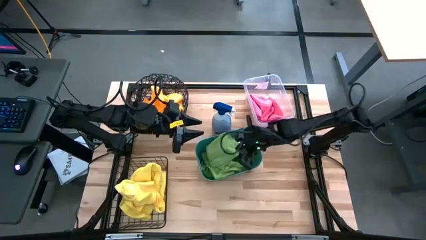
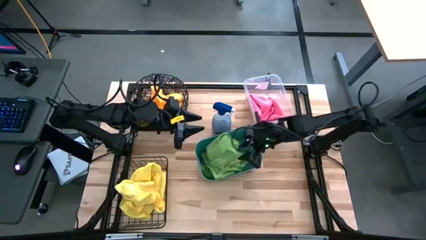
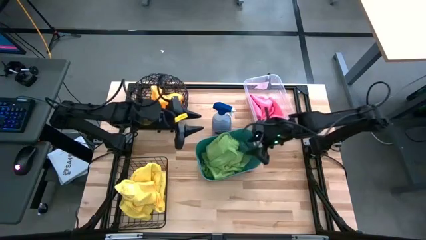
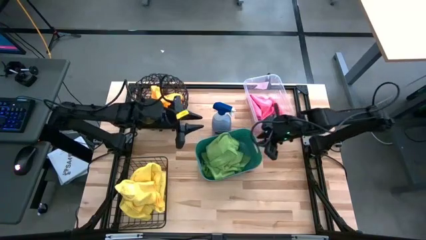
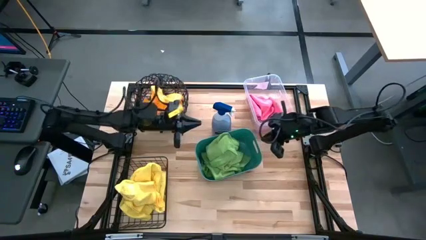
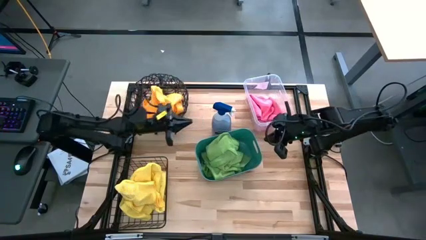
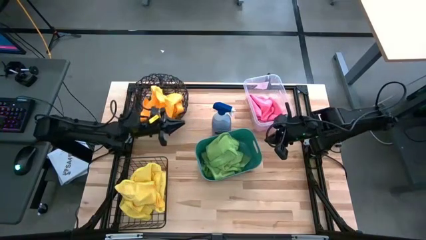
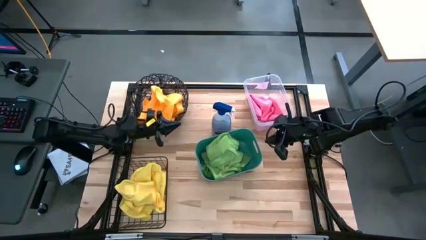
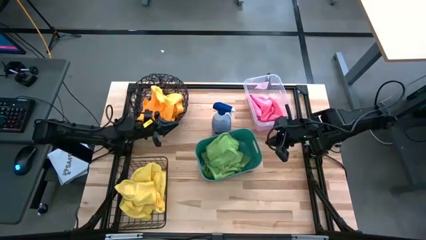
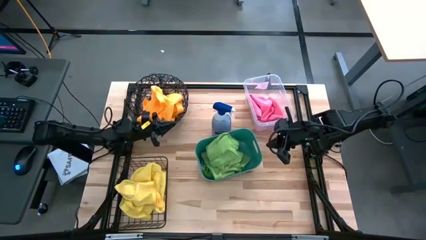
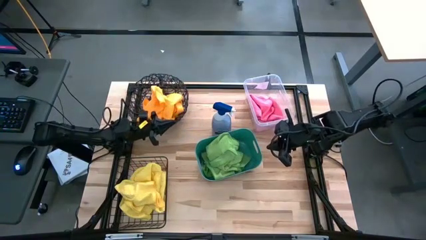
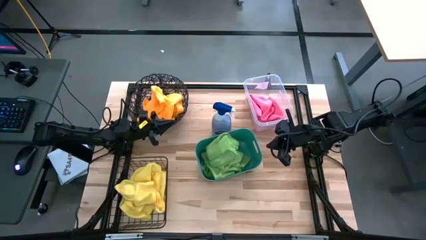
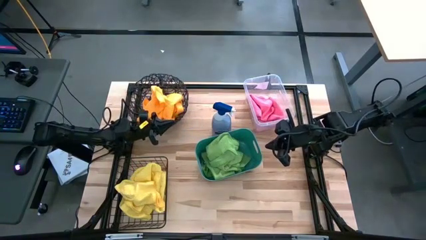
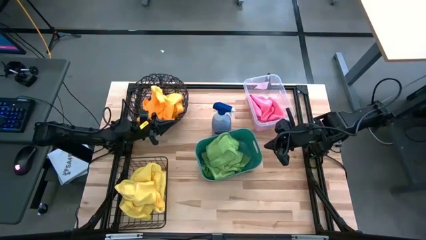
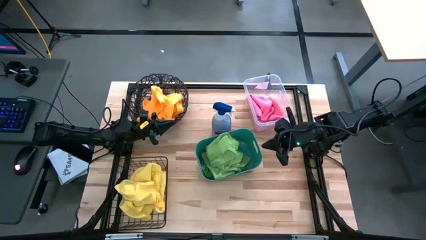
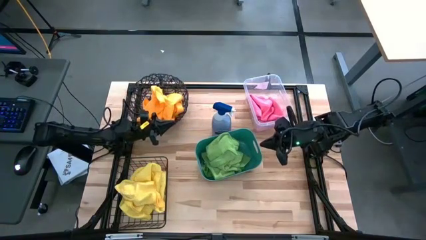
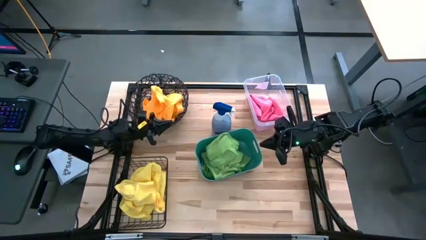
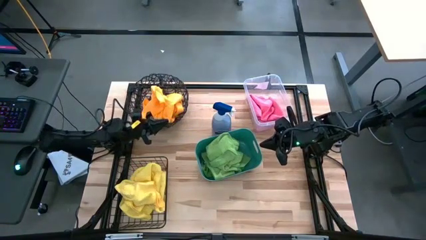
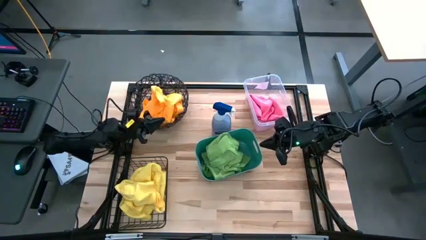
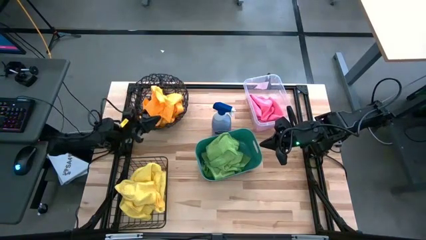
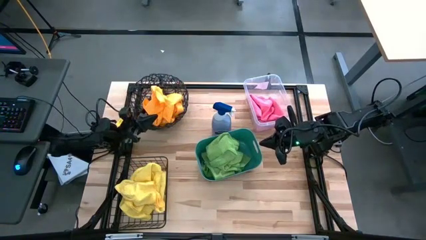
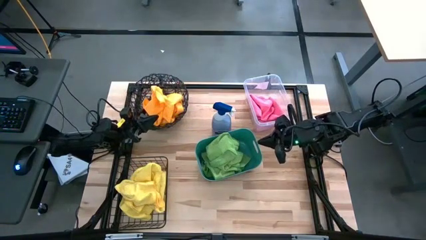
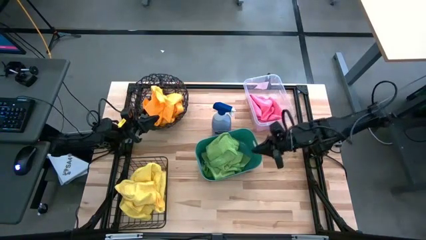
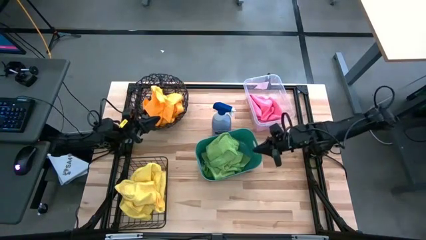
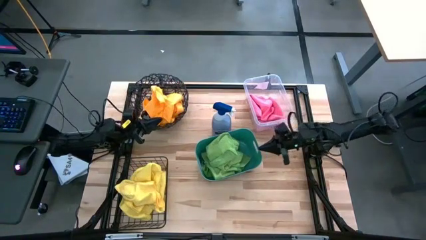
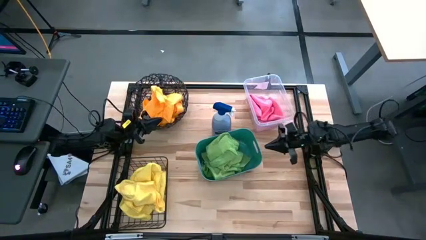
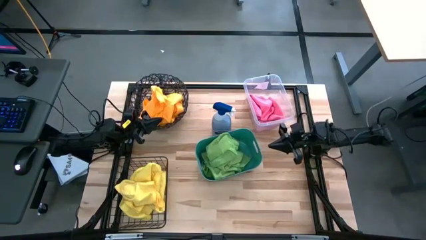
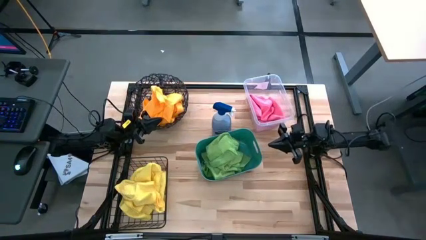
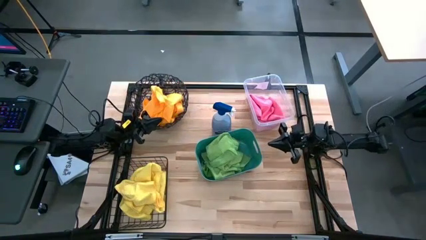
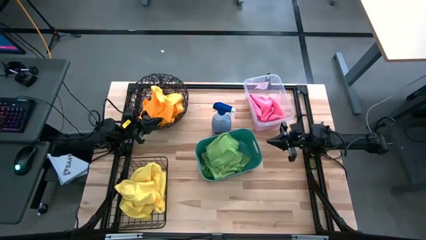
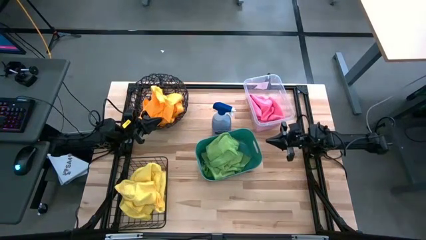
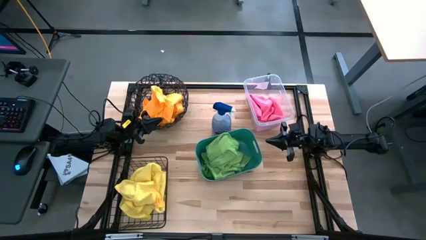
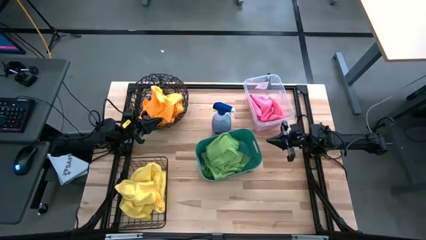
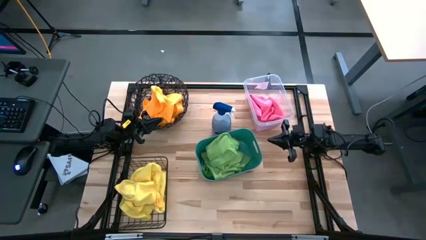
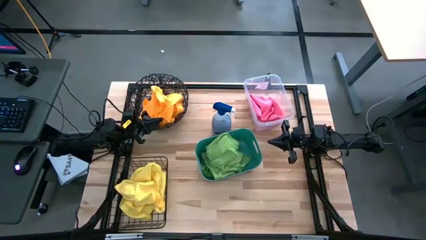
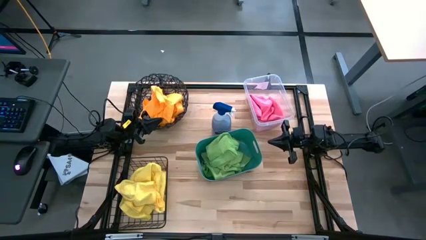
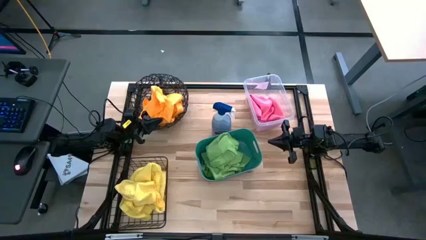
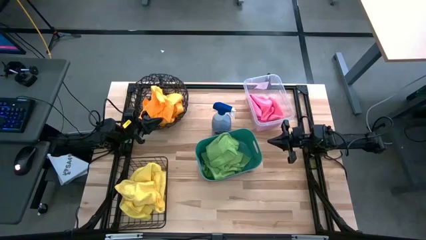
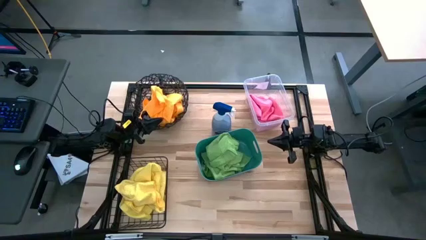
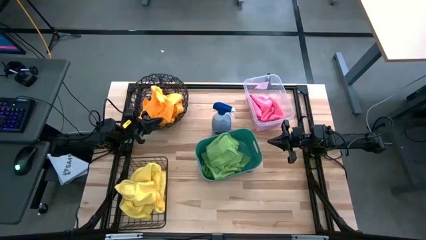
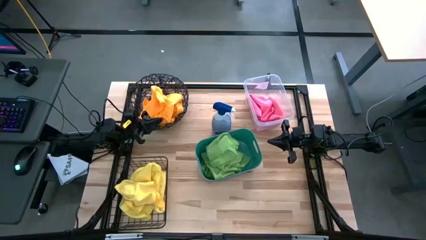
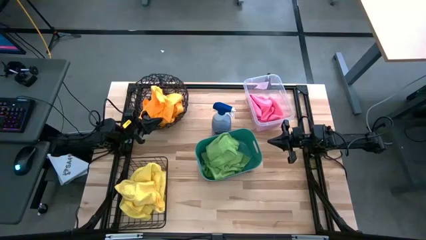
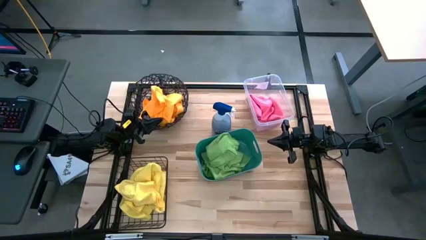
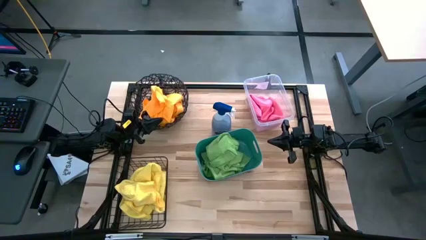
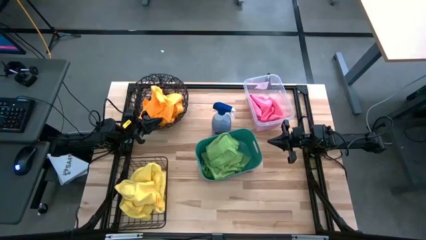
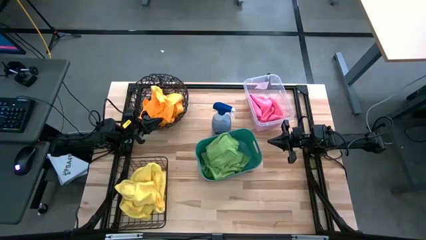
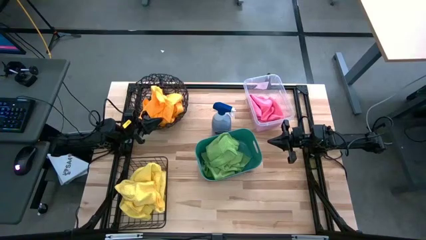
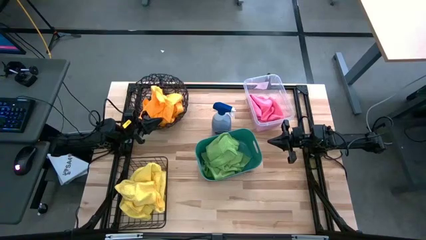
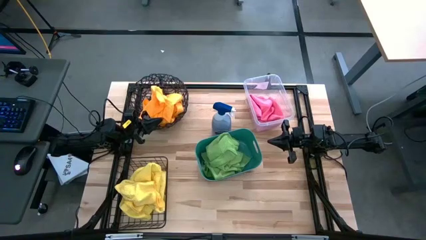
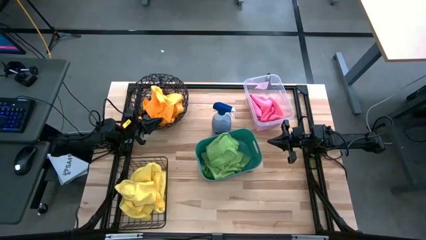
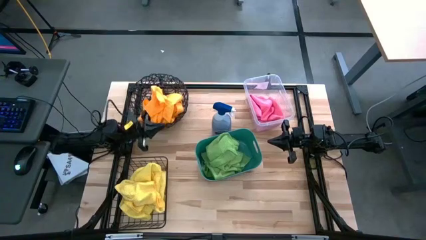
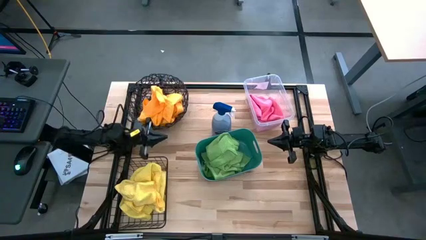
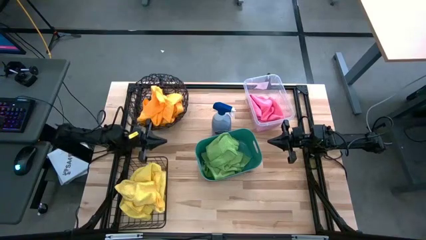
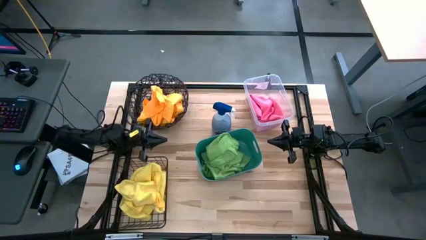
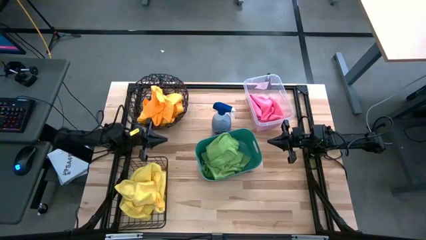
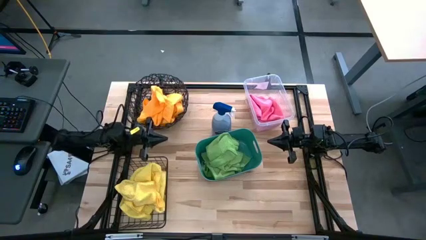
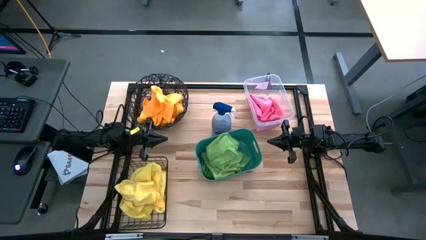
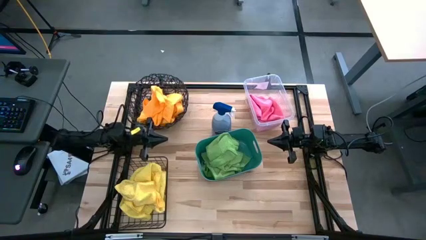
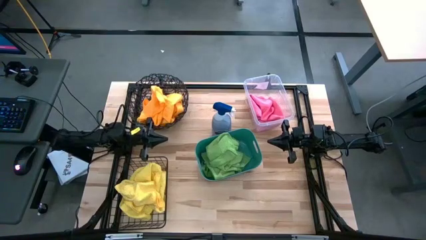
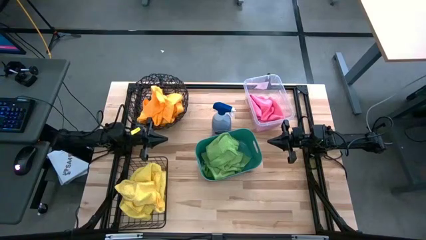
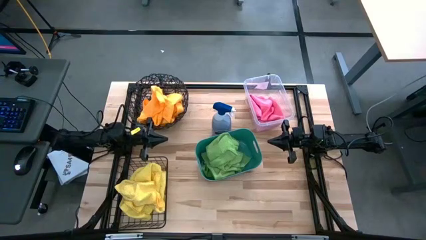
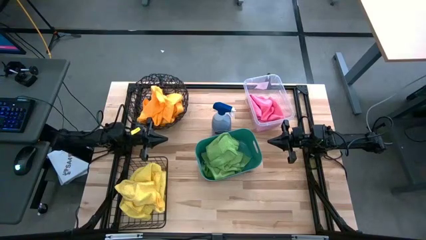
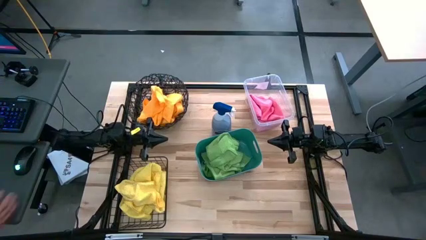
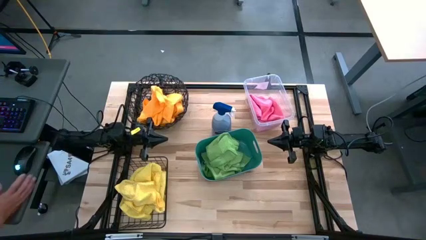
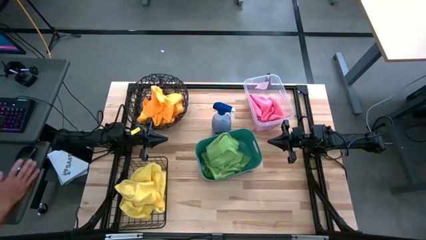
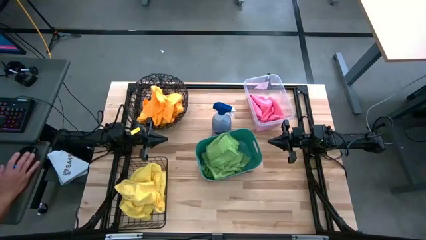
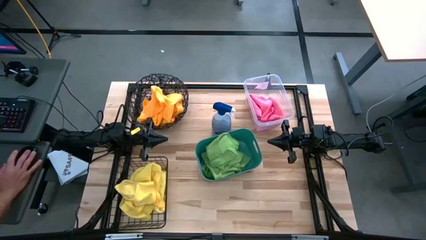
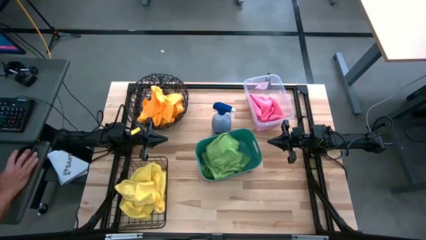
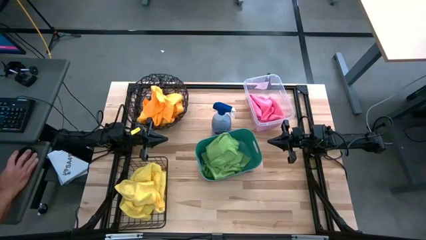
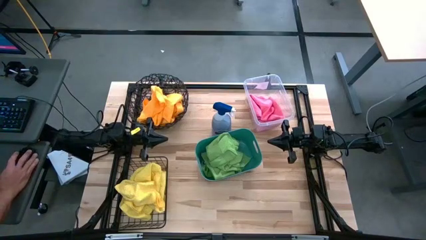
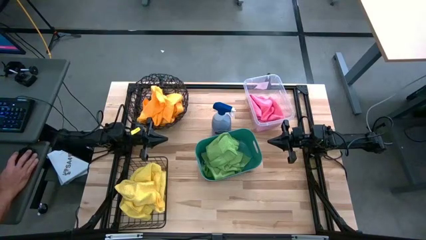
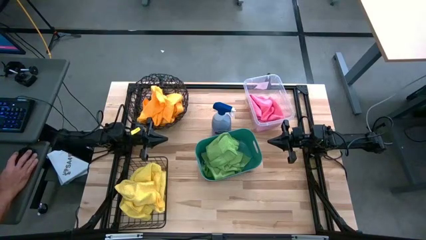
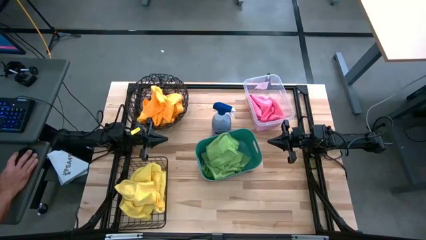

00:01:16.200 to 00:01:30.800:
Task: Sort microfiber towel by color & place in baskets
Return to Home Position
